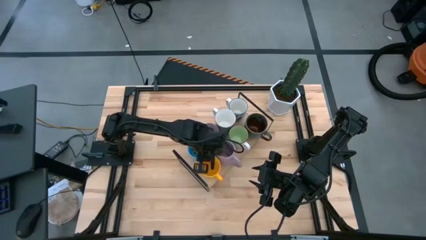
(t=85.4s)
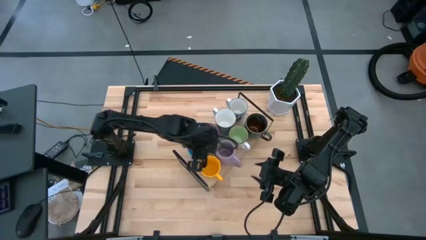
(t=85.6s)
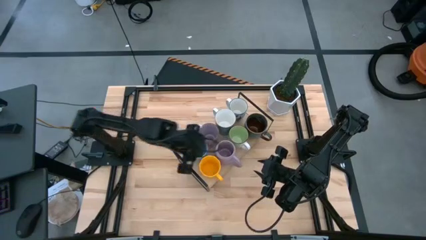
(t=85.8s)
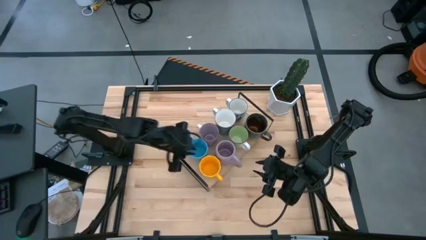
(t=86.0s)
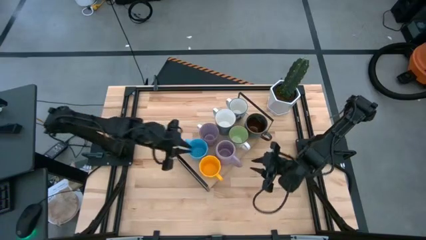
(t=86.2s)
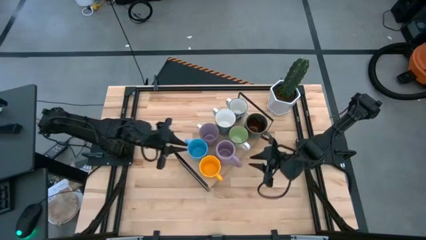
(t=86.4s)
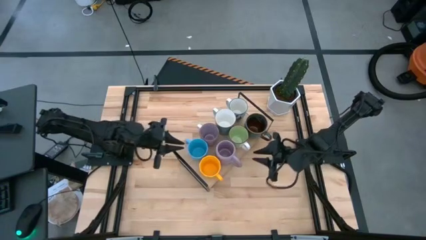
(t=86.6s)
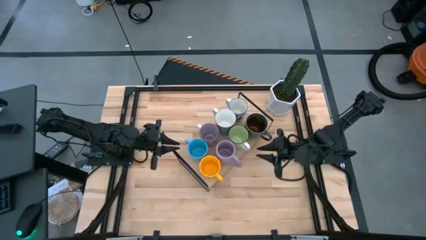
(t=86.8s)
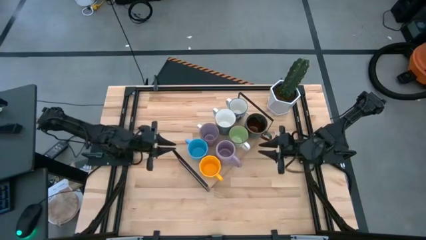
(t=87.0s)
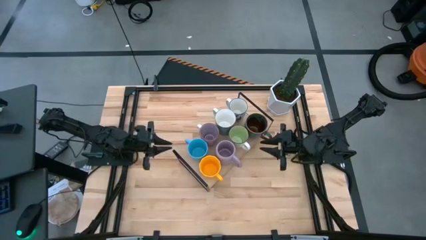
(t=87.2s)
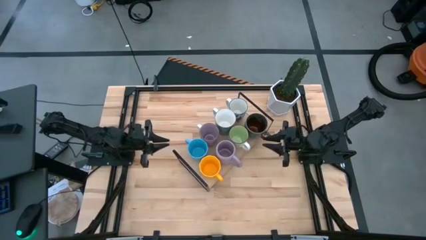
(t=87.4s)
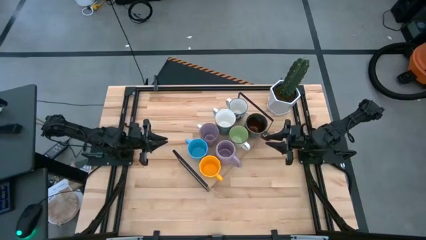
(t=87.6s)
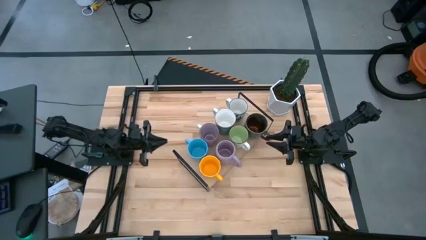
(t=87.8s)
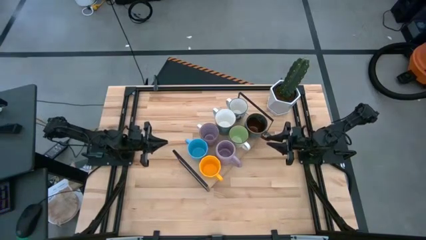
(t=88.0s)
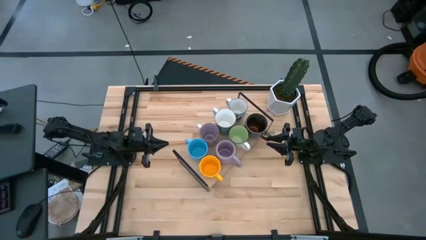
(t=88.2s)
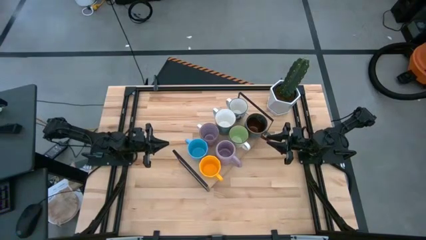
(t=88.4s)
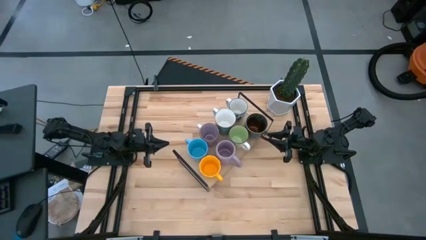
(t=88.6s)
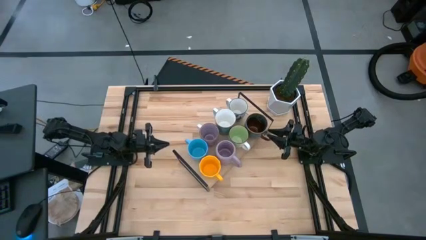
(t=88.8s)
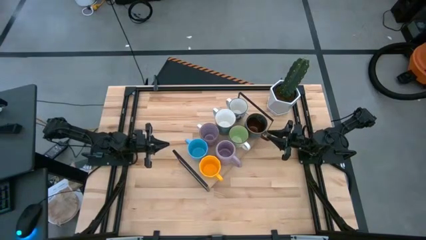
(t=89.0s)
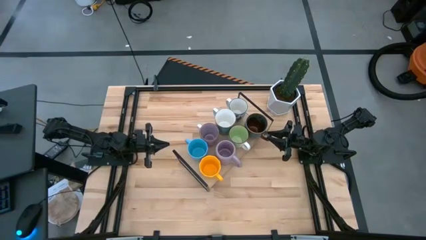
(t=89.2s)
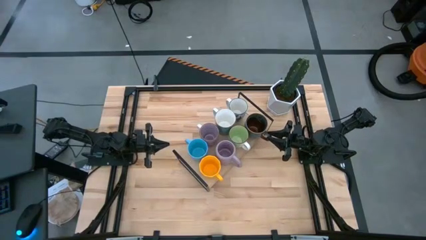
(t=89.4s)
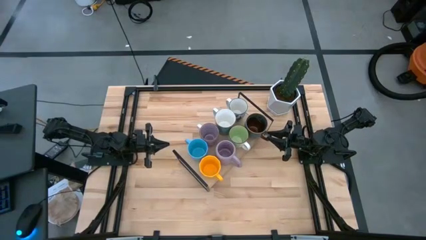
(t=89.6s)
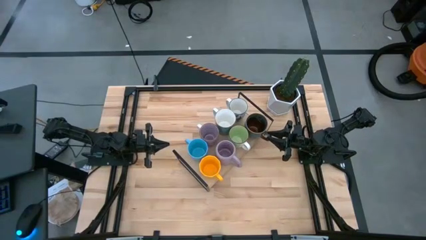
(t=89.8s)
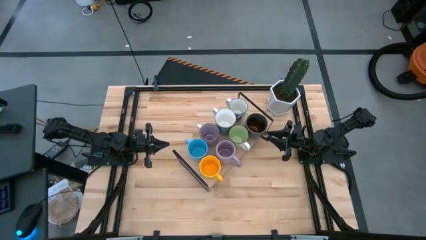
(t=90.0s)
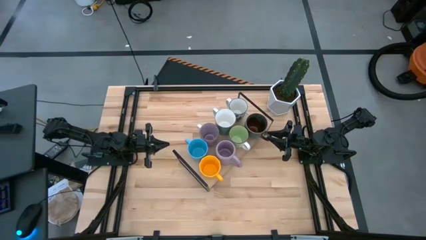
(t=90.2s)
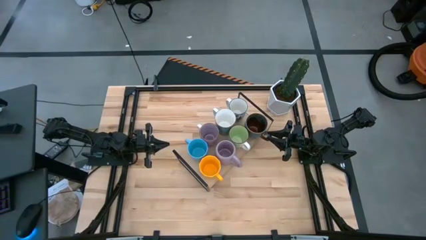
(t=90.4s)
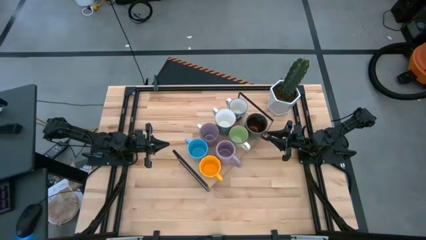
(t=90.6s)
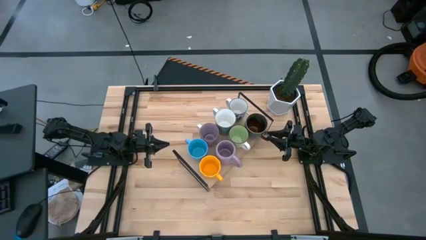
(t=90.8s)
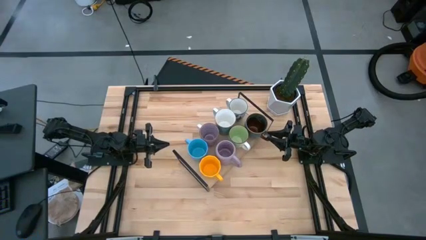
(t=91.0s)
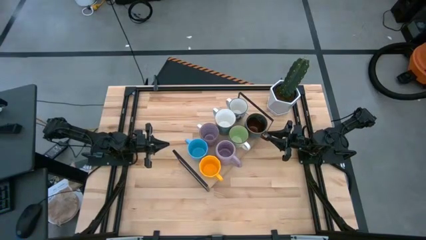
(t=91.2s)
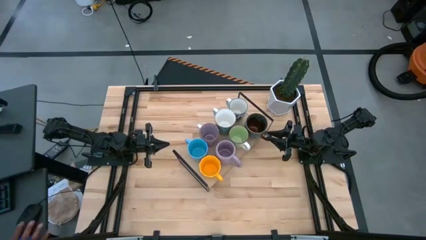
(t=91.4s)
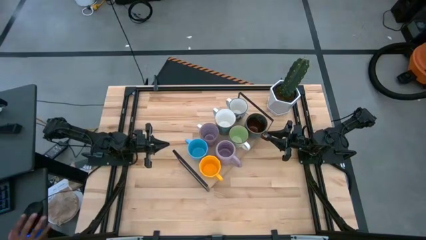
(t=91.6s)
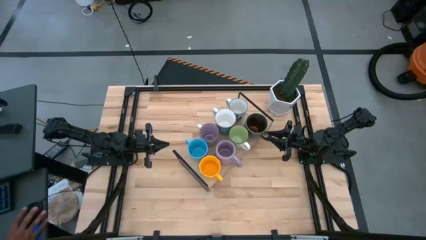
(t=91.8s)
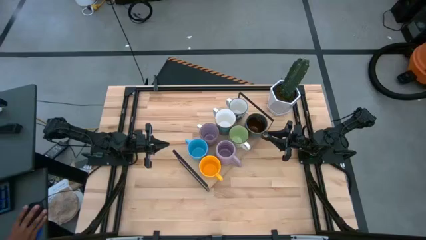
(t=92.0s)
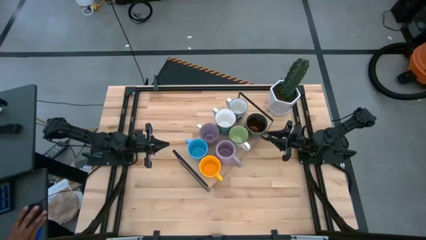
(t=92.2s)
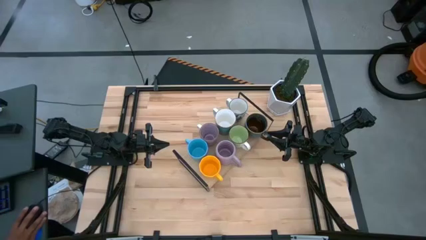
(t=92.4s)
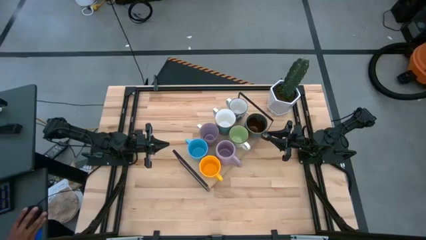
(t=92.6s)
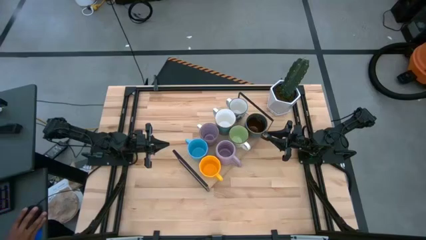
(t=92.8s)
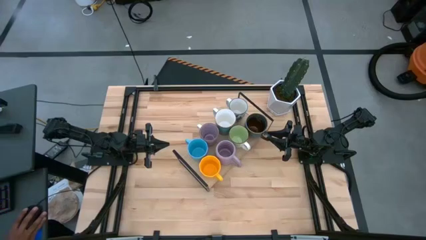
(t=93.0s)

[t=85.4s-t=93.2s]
Task: Place coffee mugs
Return to Home Position

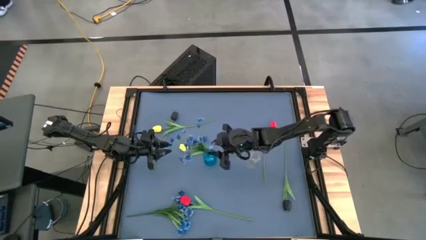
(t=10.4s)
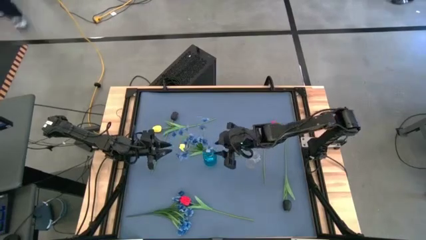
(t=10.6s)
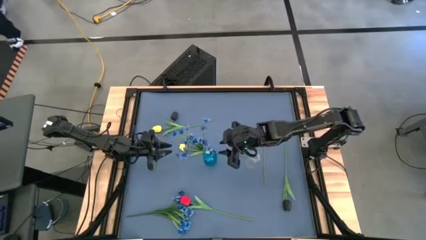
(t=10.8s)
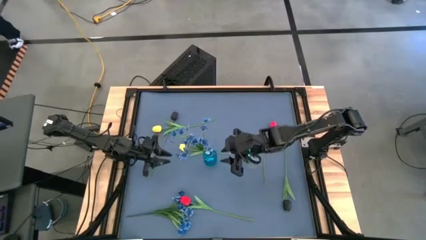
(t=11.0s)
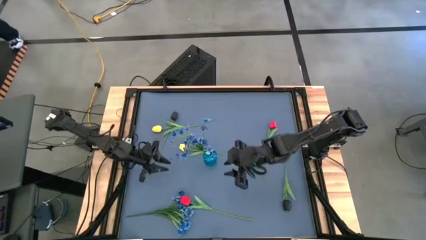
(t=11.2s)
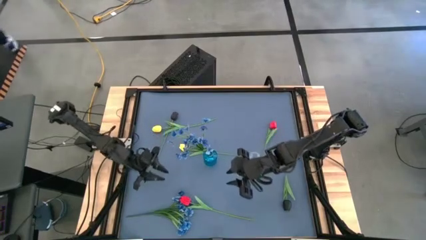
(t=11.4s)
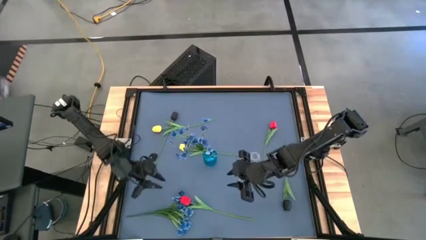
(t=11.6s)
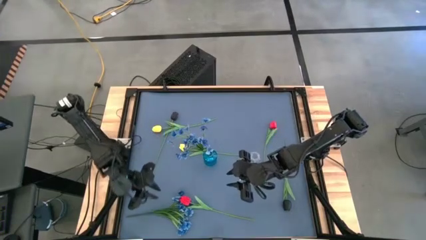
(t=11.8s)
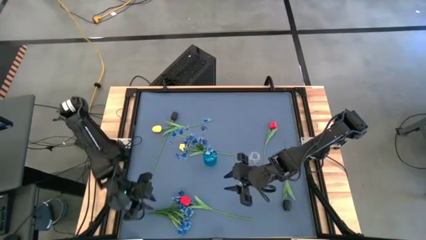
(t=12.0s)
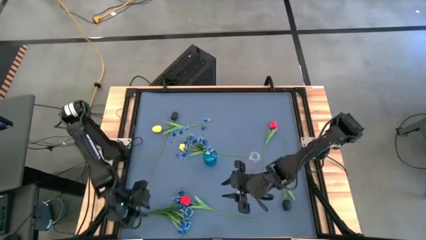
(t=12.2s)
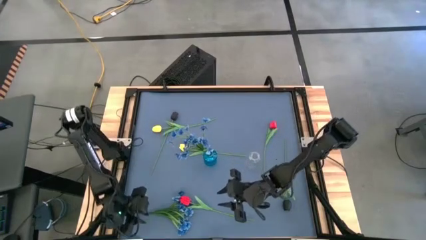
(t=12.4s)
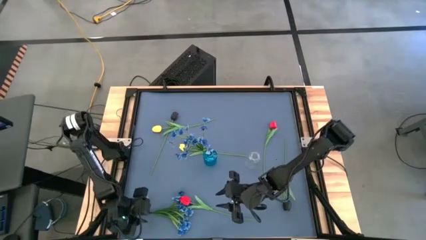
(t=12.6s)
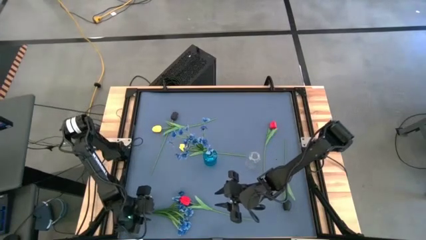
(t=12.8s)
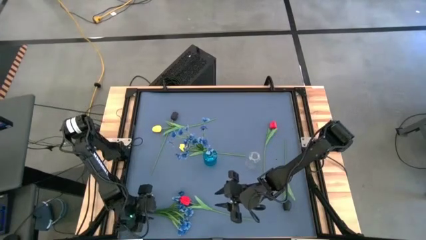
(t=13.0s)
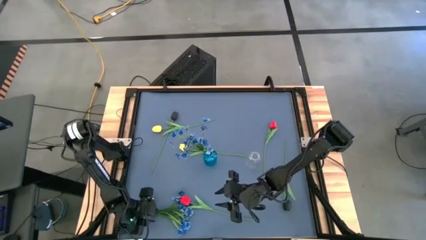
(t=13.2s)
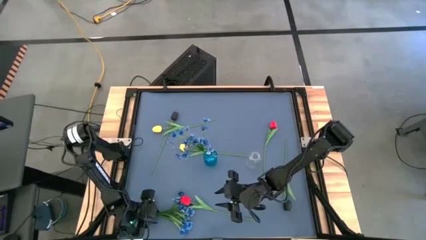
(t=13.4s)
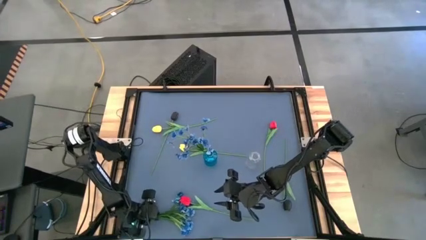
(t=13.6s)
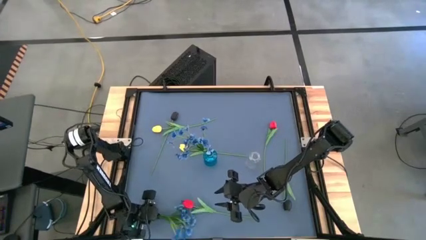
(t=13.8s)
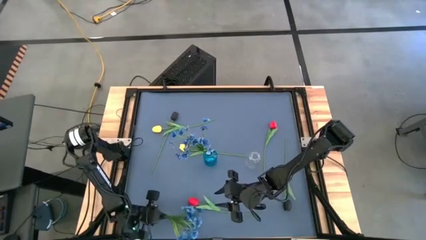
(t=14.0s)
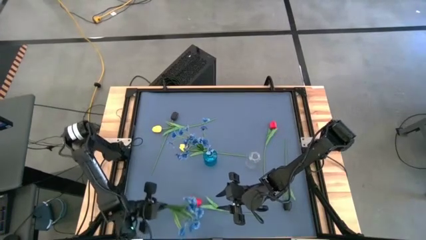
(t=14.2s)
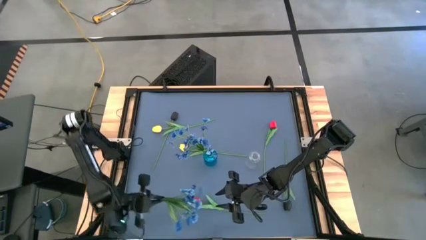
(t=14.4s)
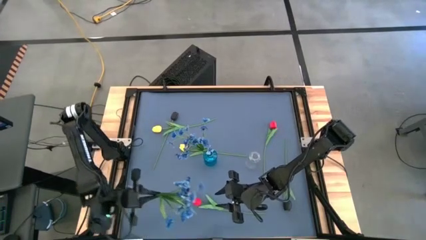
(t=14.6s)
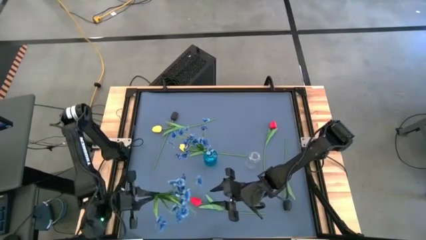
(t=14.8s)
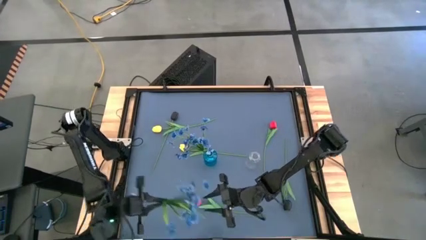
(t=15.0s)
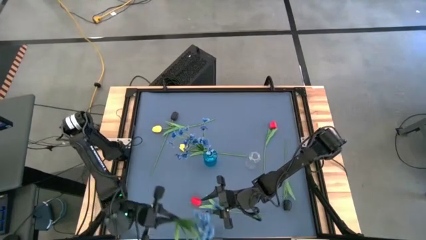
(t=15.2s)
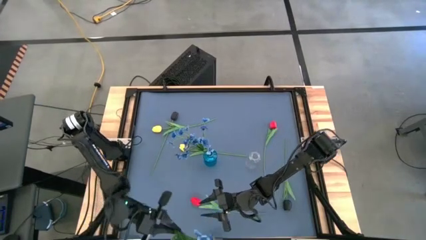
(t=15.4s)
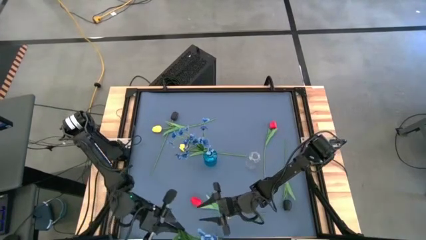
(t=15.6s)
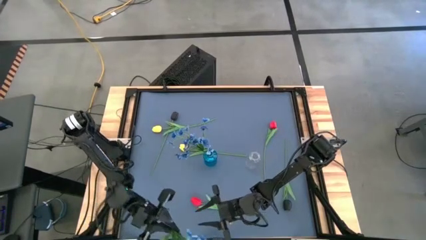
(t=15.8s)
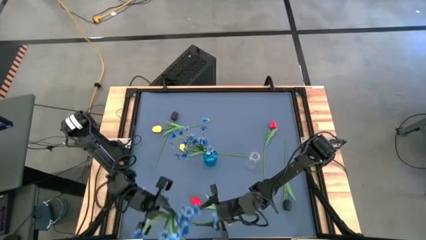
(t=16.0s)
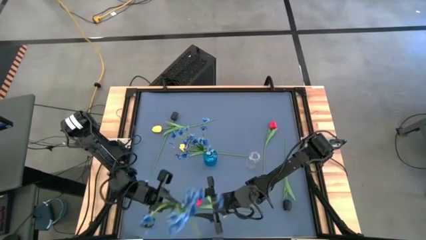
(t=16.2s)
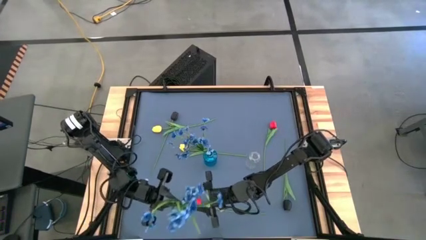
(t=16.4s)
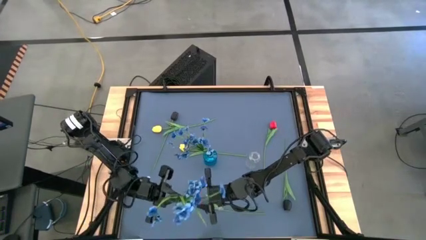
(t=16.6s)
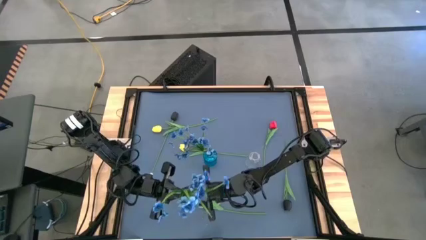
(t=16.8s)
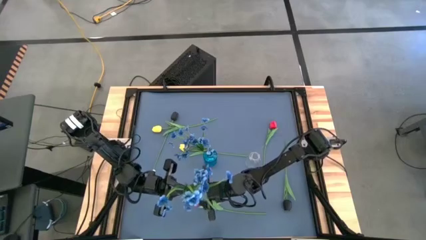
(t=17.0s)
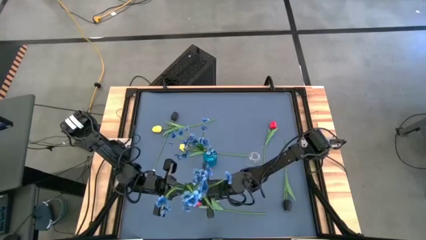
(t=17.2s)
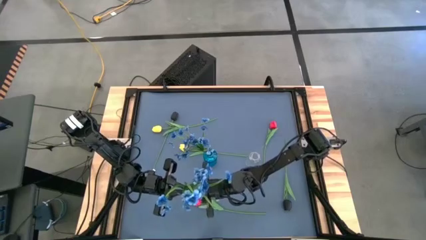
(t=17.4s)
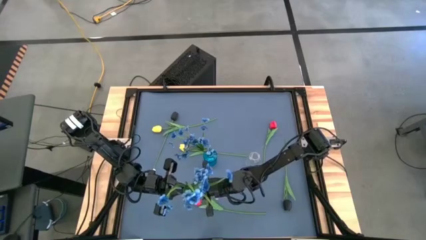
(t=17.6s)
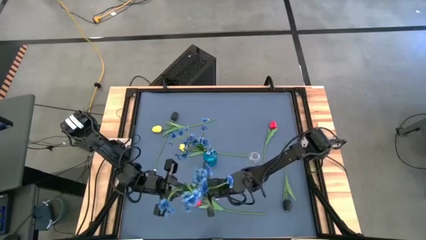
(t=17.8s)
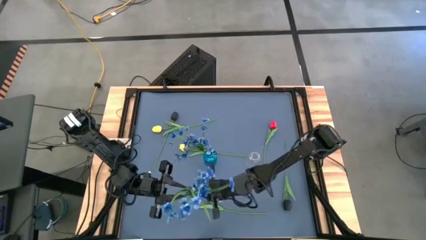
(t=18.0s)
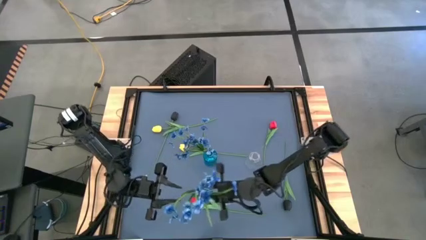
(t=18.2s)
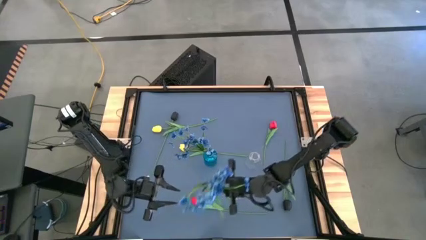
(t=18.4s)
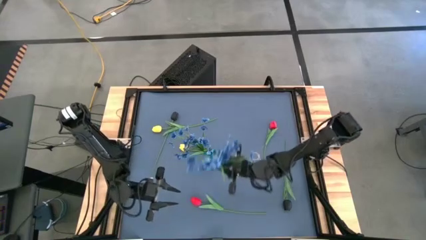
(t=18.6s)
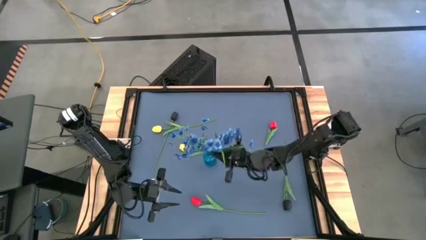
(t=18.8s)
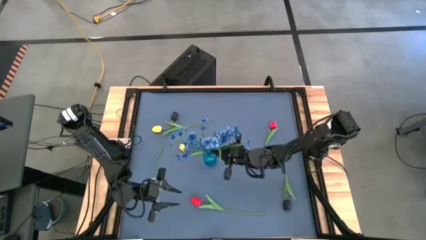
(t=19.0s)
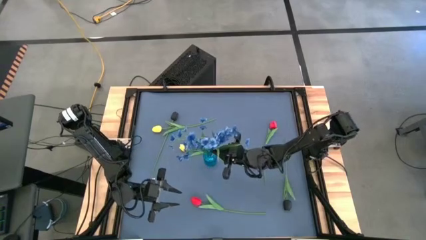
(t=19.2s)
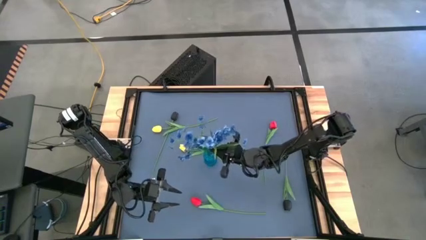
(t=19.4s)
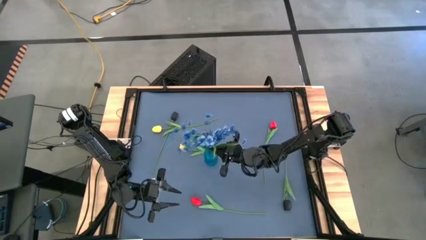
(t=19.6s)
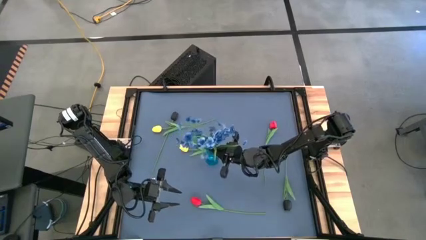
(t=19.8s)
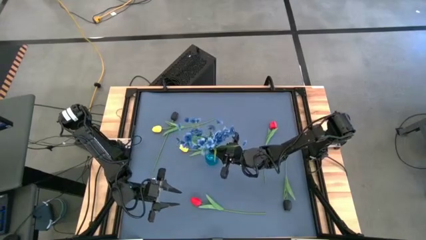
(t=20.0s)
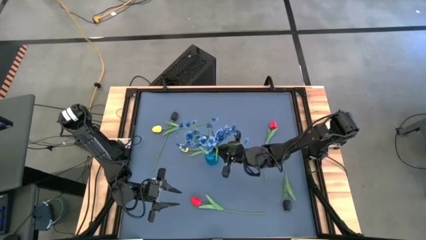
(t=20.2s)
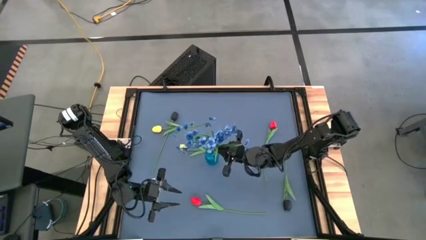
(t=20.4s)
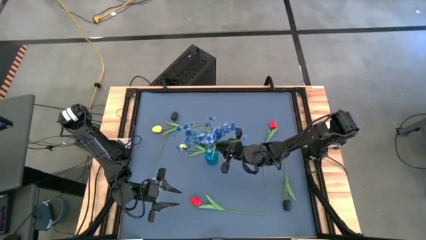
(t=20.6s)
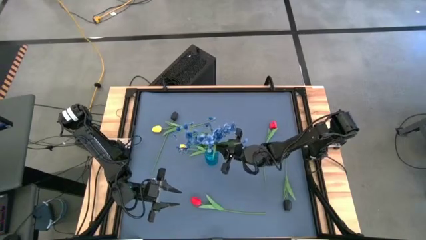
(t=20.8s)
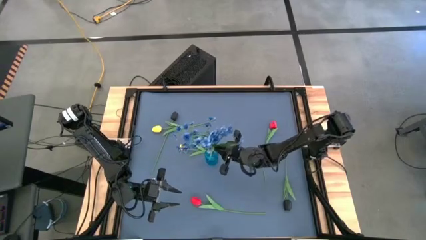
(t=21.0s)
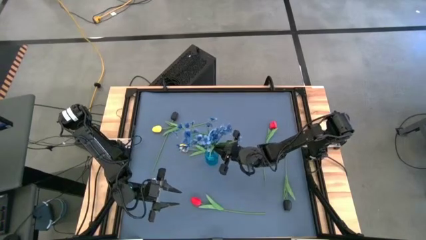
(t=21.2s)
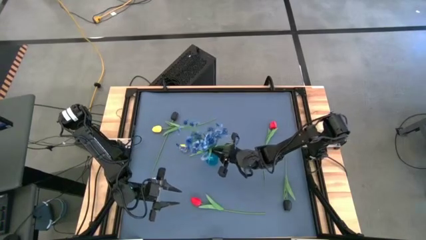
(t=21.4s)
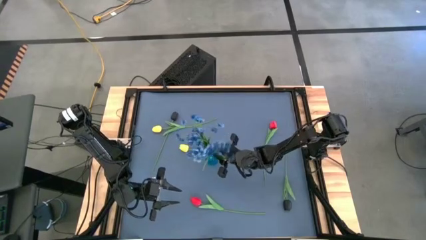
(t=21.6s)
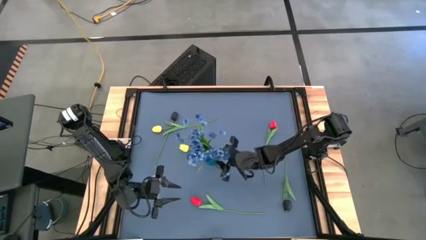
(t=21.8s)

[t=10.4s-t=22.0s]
Task: Sort flowers into vase by color
Put the blue flowers into the blue vase
